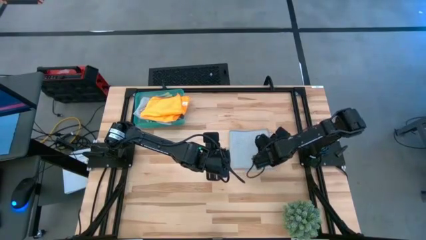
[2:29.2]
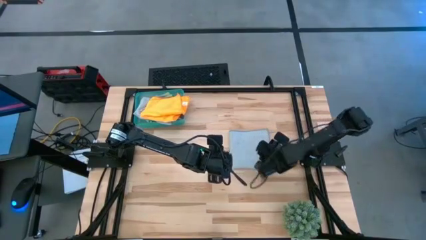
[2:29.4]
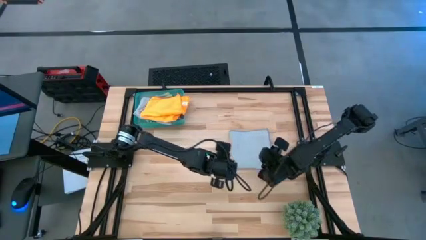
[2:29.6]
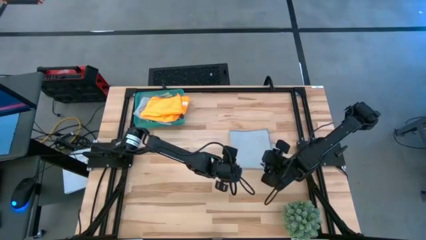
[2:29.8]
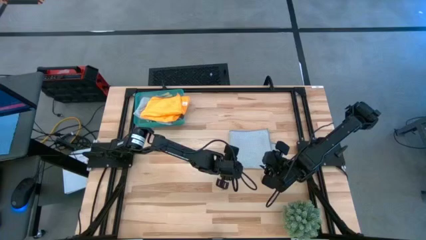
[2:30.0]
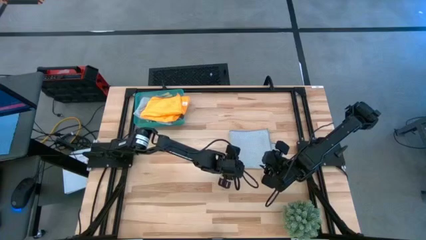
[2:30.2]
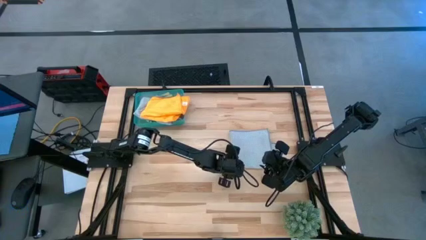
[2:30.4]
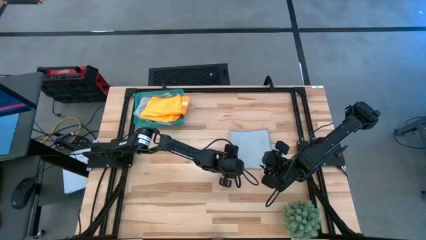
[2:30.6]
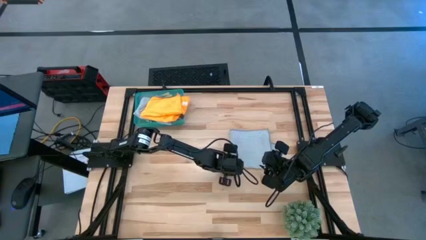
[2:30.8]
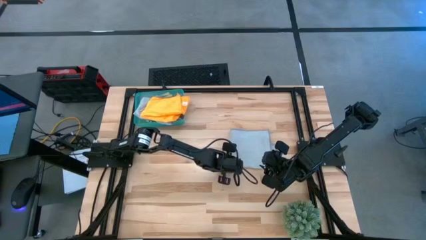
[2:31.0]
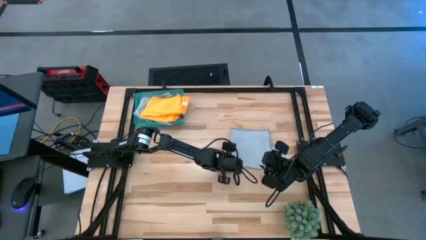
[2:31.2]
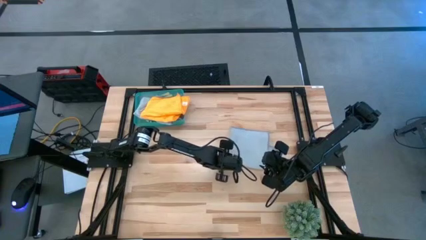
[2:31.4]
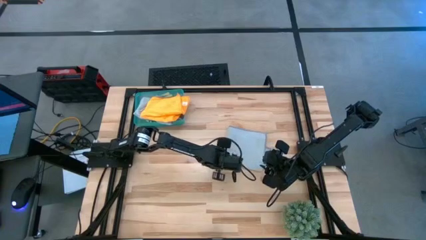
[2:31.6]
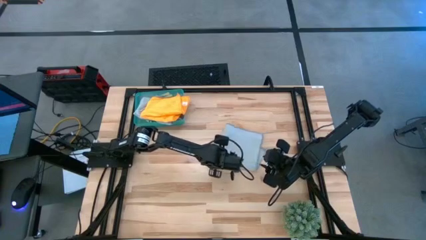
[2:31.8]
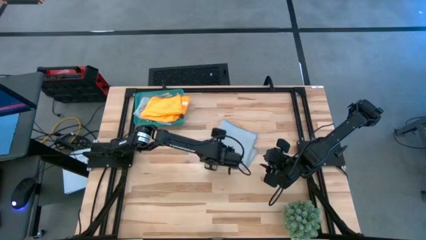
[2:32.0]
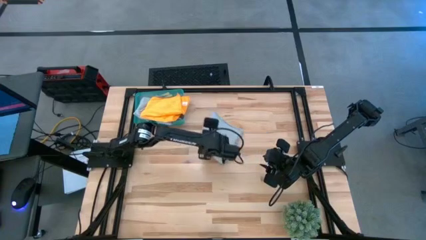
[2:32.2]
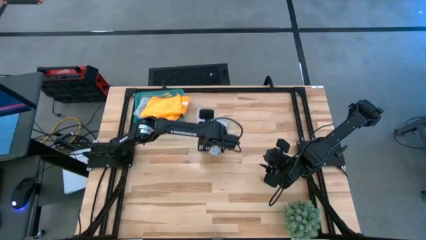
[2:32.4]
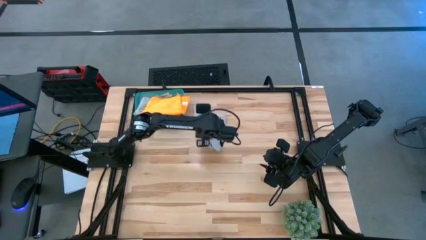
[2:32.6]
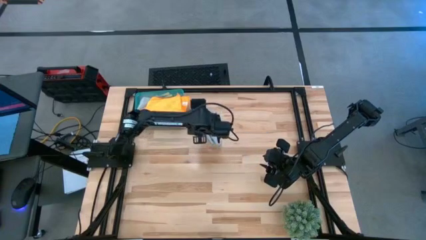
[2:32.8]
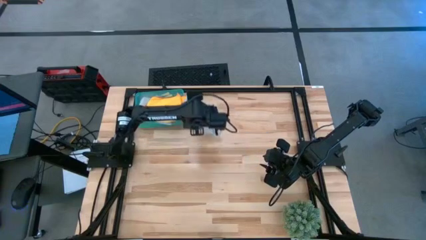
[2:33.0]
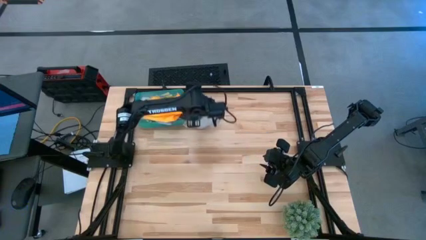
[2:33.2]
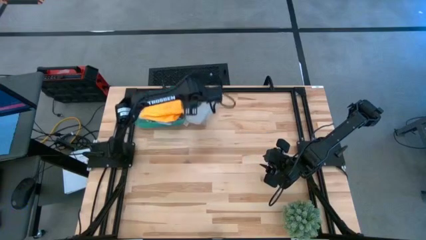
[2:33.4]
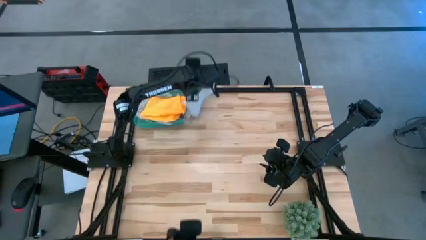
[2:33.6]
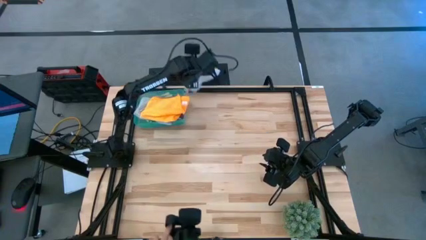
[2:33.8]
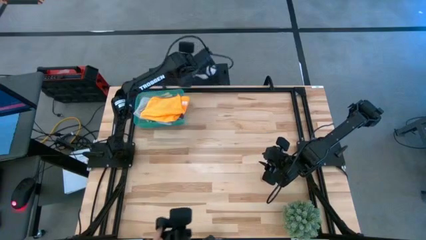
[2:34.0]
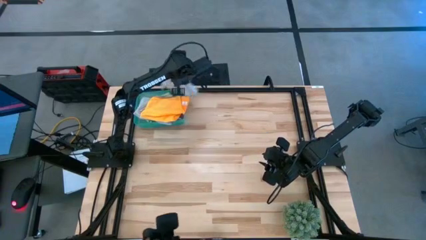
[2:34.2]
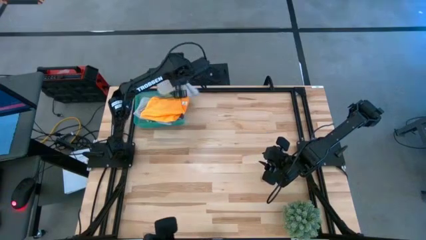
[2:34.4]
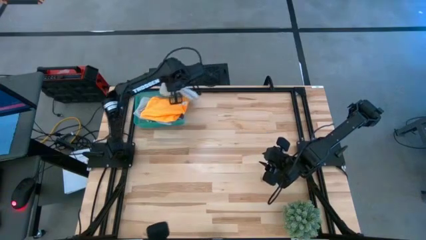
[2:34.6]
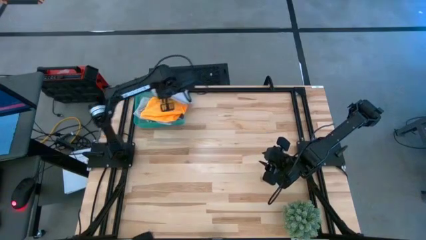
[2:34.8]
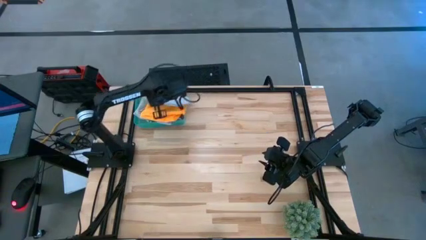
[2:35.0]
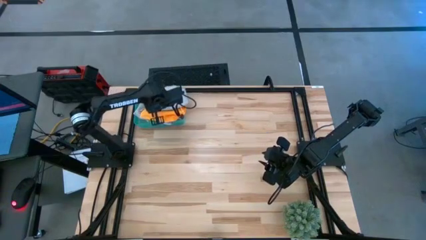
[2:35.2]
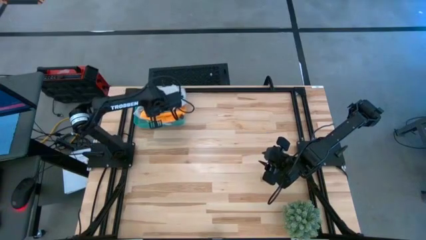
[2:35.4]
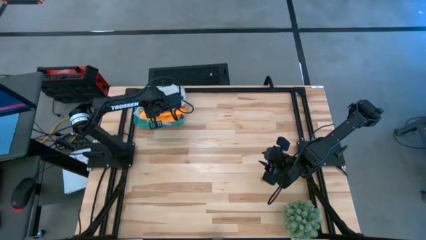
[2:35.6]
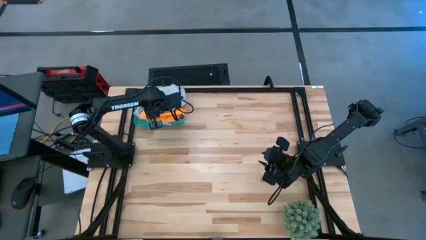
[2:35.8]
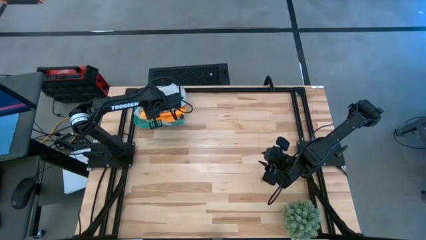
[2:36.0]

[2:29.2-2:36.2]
Task: Fold microfiber towels
Put the folded gray towel into the bin

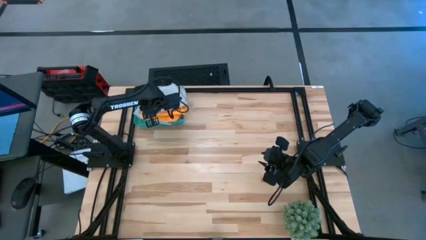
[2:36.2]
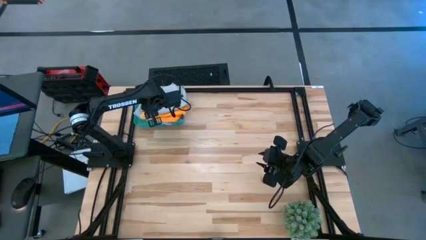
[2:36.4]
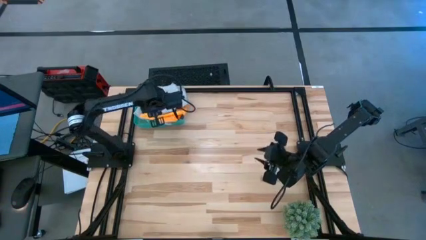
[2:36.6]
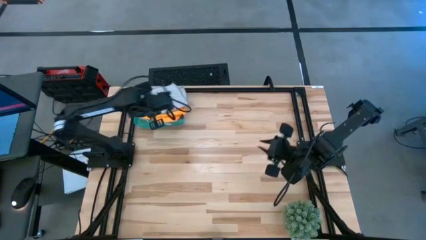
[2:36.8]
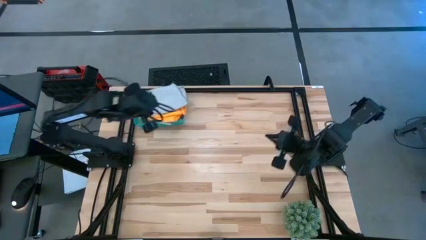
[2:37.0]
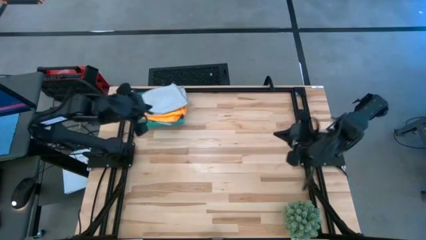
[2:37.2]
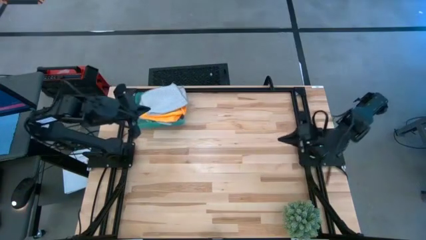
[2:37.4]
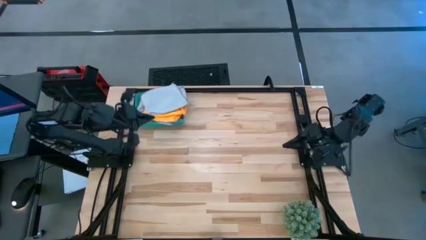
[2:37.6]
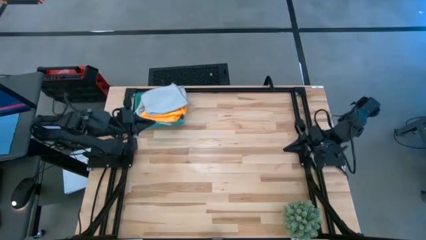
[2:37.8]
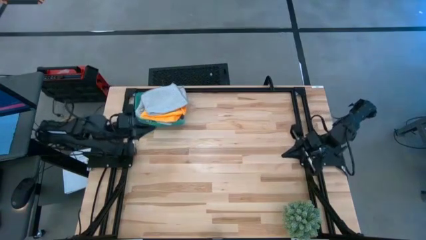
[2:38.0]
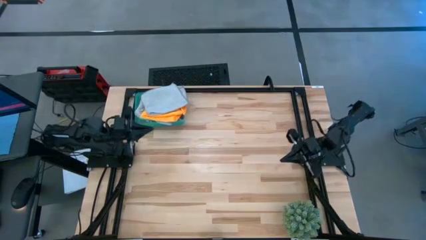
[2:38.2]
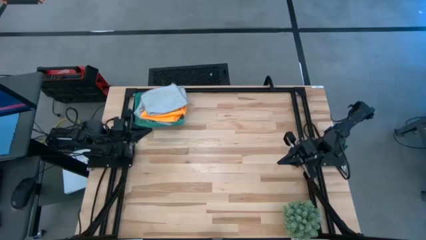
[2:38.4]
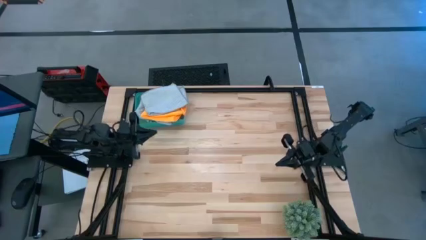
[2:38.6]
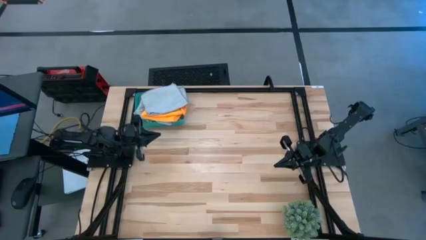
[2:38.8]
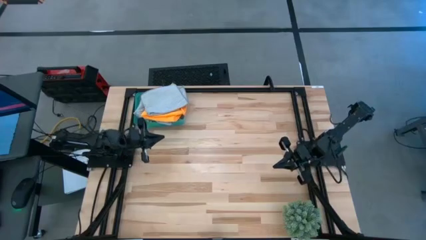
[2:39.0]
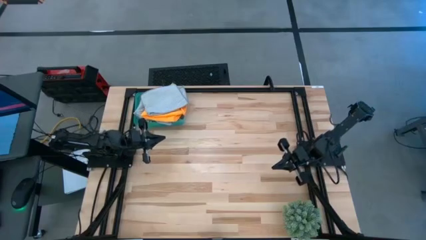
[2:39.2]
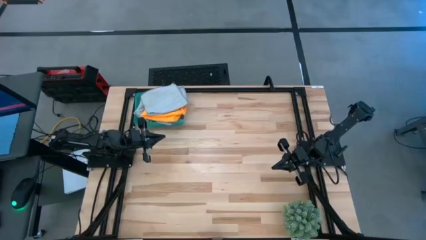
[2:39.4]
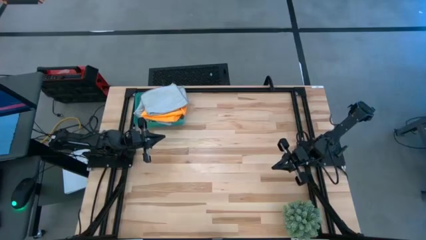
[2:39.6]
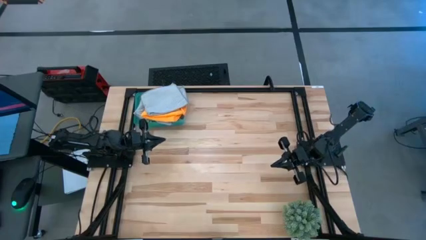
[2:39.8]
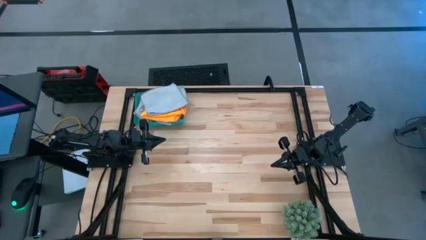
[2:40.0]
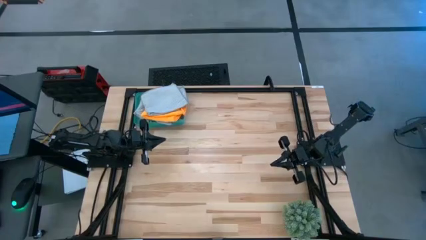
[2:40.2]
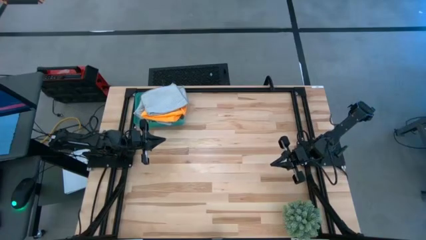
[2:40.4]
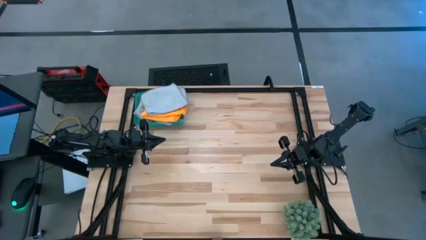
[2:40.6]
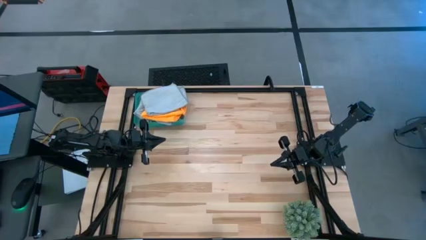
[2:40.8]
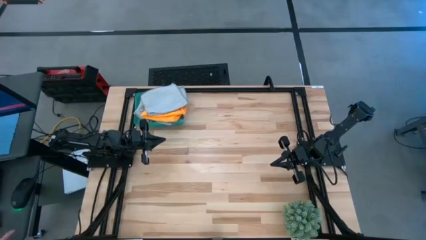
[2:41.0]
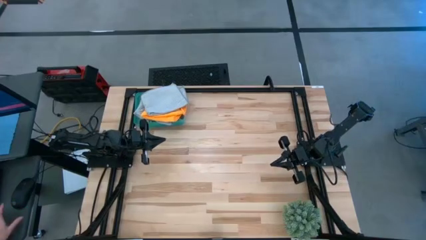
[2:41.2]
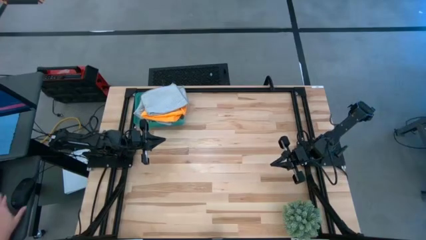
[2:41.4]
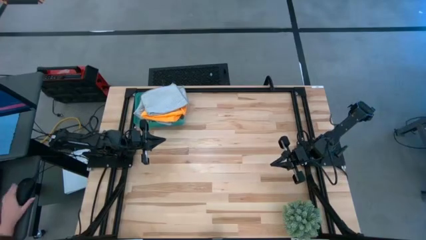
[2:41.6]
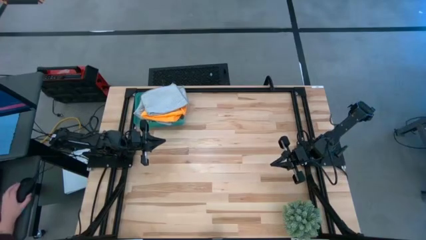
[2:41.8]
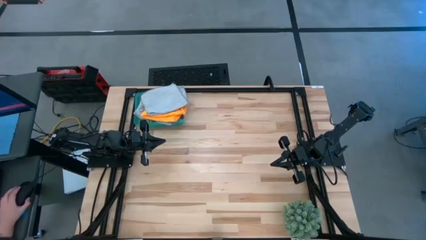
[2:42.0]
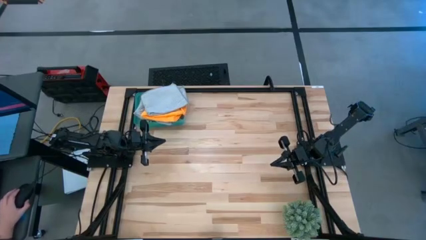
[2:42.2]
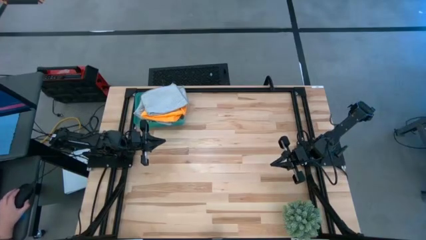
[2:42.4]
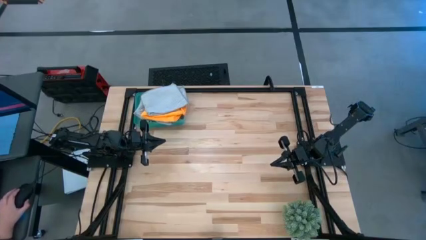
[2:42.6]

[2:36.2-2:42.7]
Return to Home Position

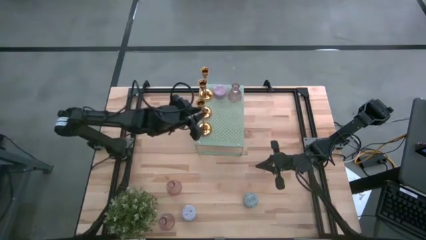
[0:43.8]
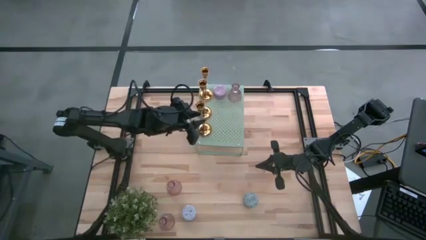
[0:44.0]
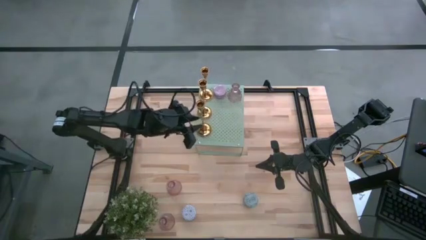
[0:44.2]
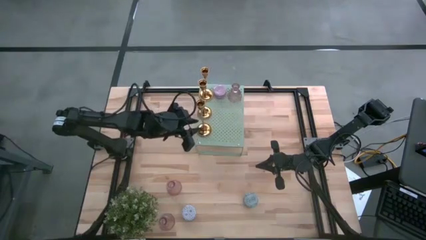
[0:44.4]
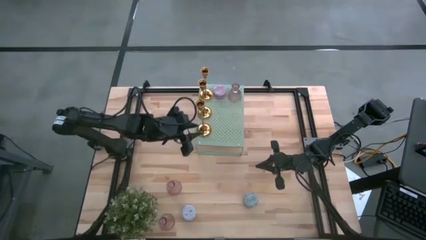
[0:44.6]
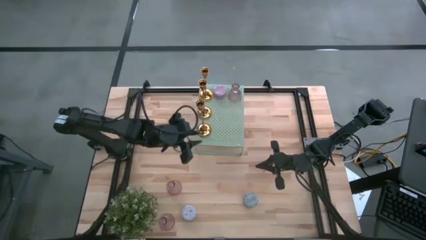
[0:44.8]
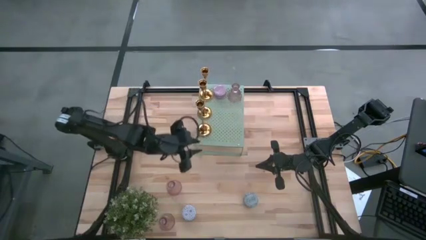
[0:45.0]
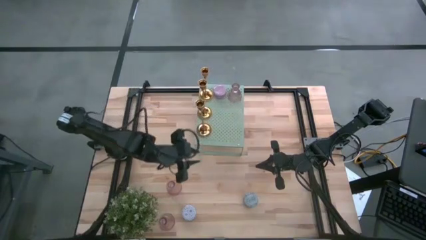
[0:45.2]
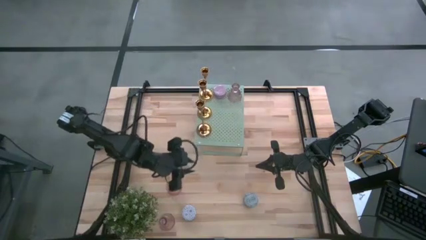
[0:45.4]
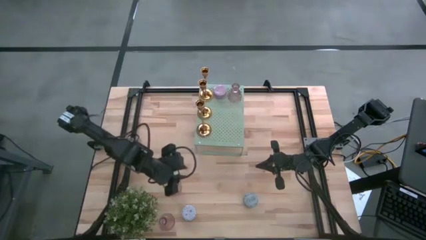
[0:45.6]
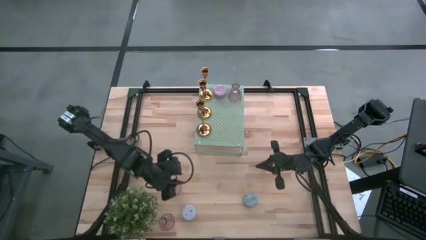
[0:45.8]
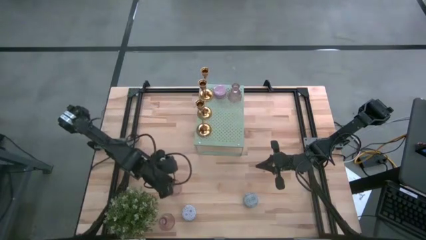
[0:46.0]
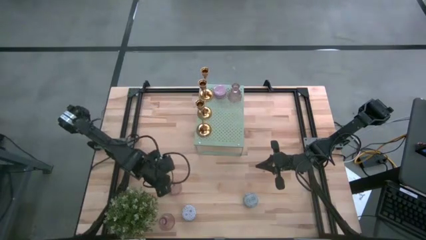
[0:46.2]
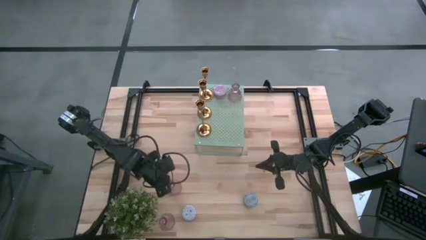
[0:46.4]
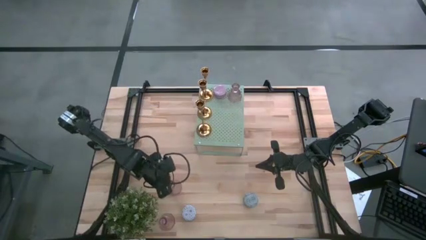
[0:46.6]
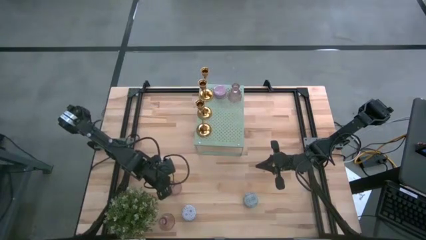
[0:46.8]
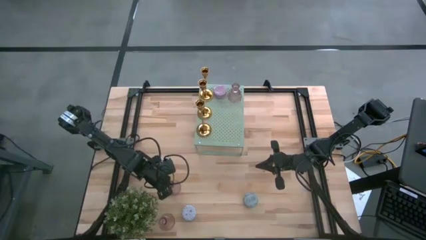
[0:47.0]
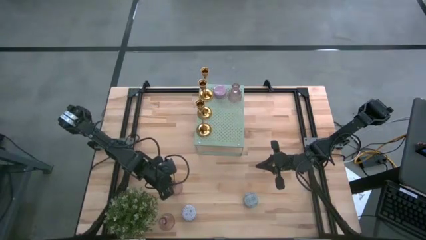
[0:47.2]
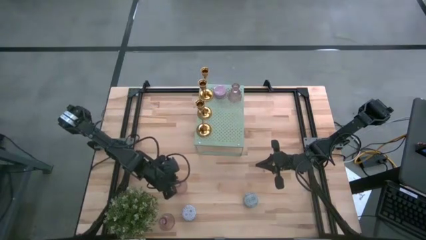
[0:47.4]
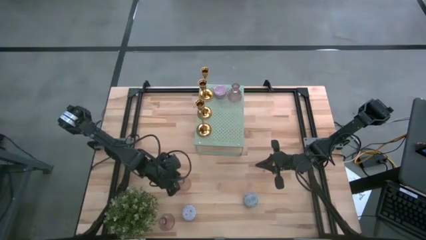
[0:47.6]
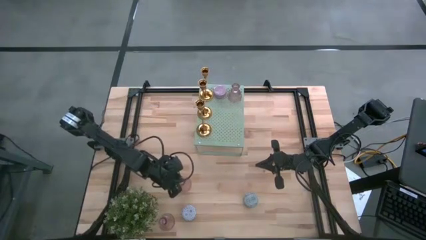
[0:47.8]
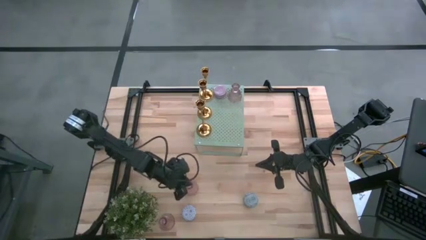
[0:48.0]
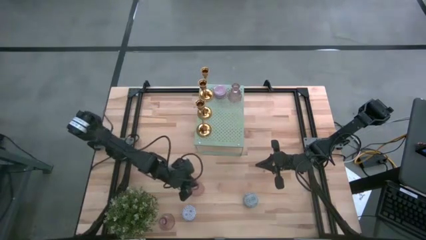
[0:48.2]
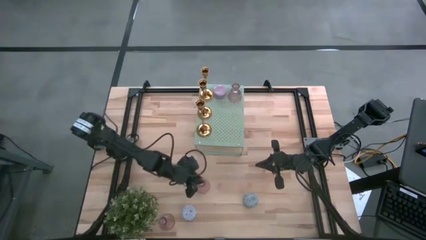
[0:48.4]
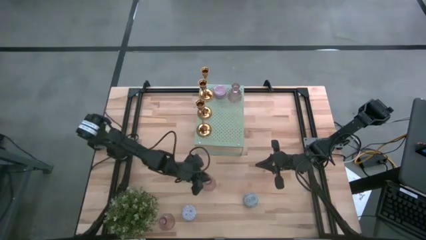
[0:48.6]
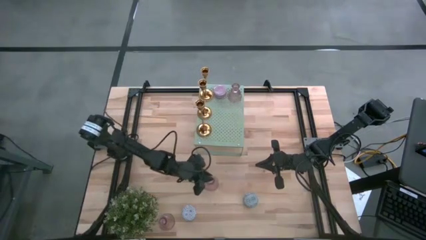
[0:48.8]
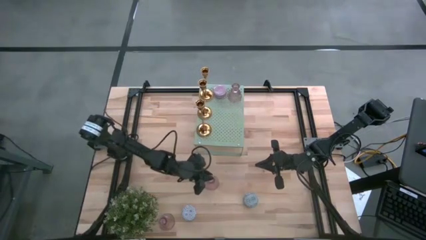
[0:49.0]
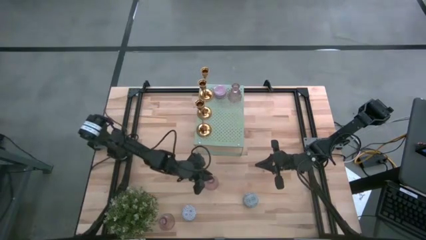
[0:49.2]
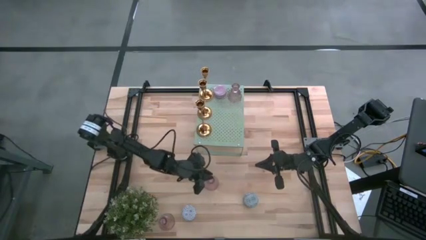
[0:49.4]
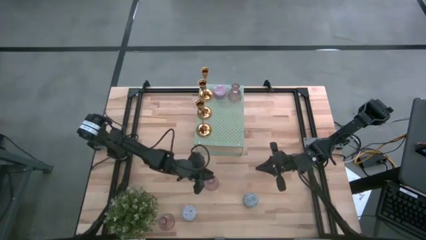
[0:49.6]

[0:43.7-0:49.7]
Task: Pick & Place candle stick holders
Move the top pink glass candle holder
